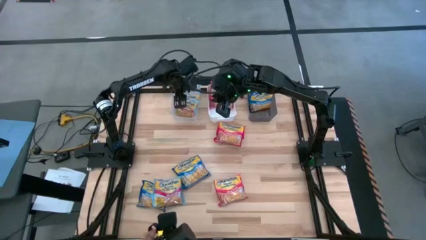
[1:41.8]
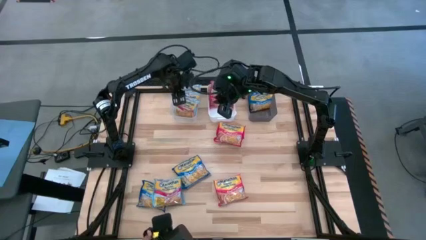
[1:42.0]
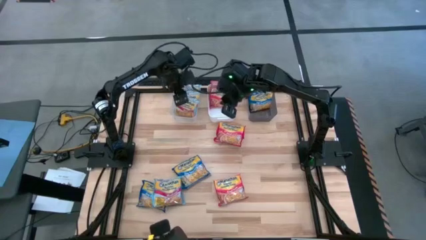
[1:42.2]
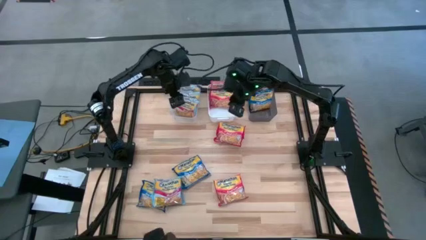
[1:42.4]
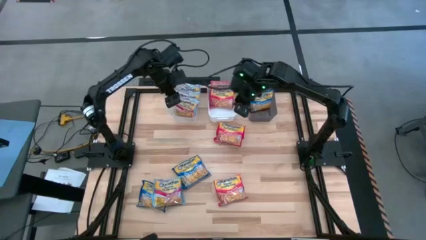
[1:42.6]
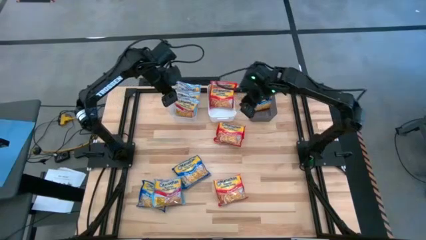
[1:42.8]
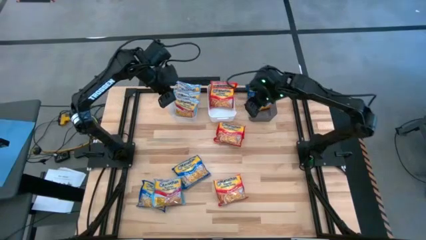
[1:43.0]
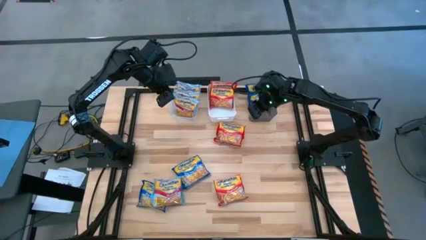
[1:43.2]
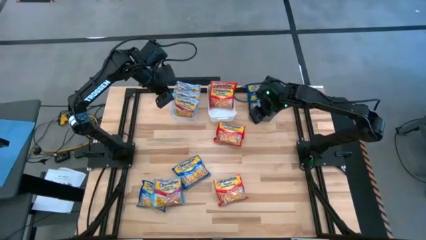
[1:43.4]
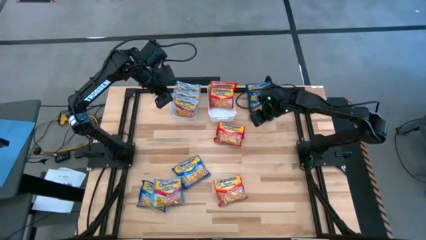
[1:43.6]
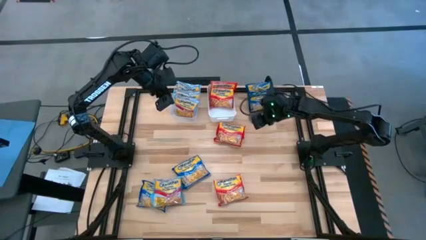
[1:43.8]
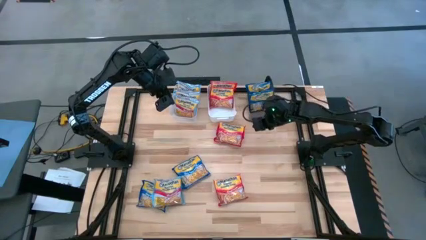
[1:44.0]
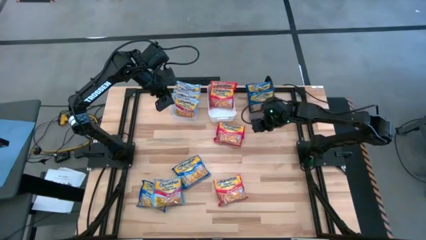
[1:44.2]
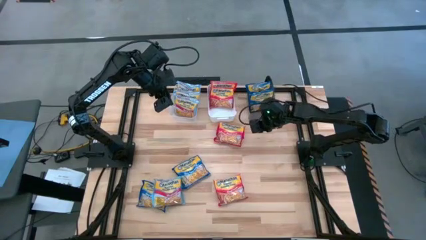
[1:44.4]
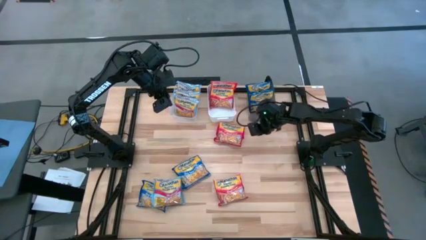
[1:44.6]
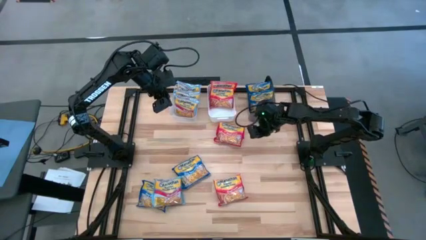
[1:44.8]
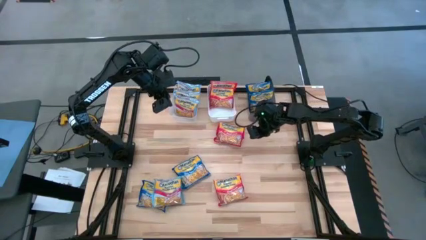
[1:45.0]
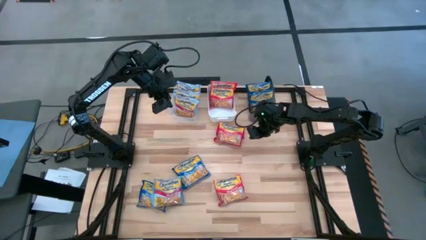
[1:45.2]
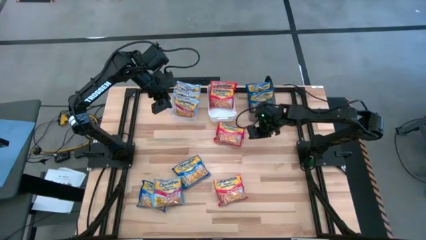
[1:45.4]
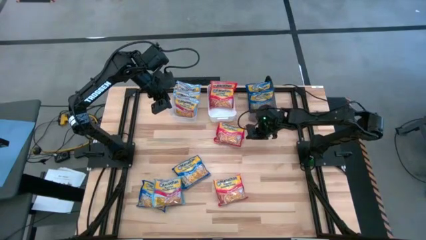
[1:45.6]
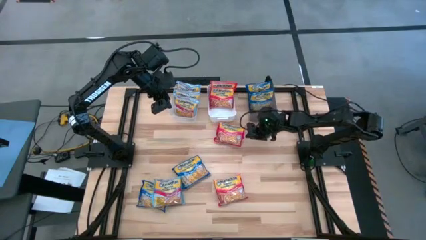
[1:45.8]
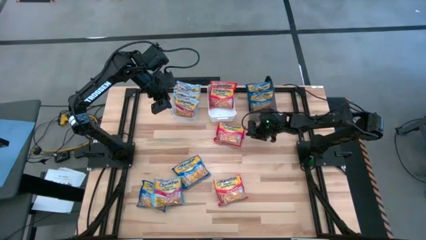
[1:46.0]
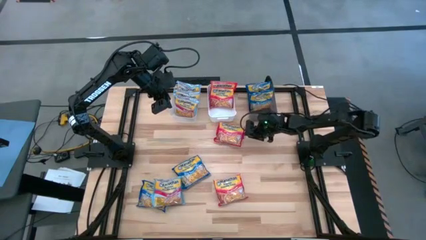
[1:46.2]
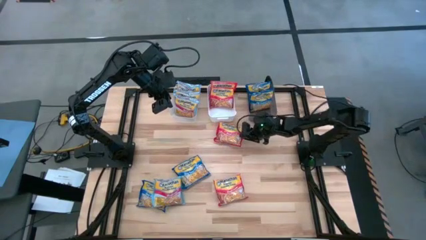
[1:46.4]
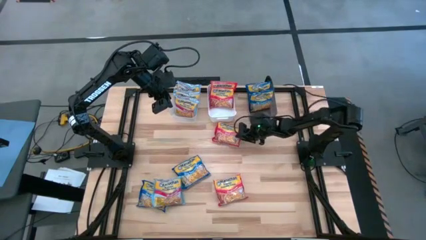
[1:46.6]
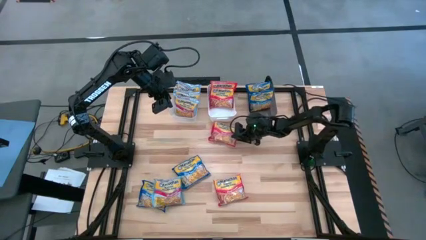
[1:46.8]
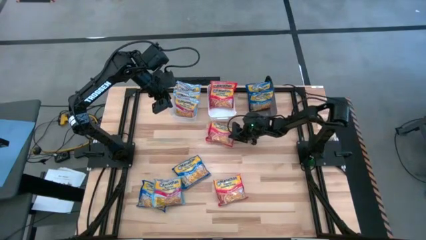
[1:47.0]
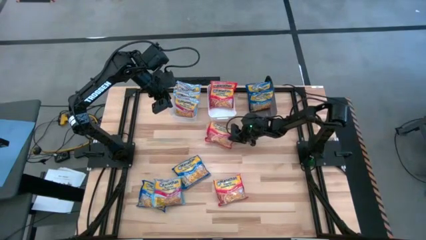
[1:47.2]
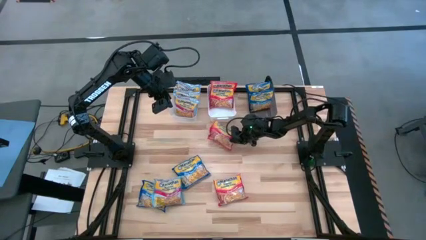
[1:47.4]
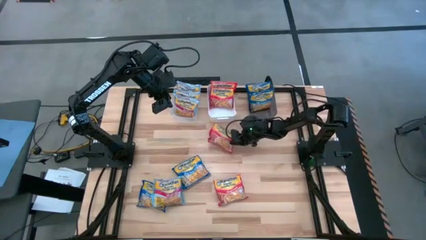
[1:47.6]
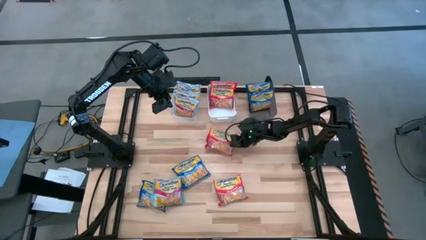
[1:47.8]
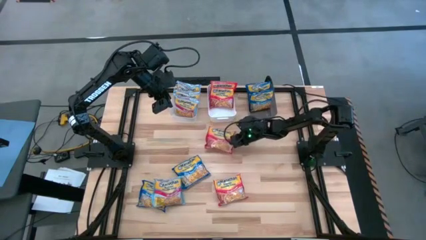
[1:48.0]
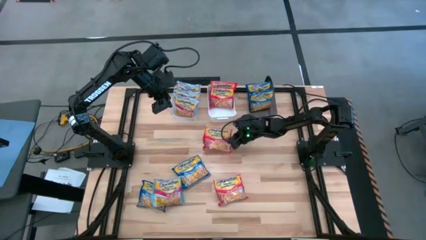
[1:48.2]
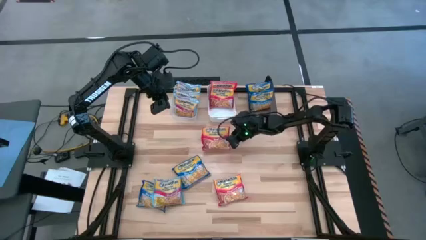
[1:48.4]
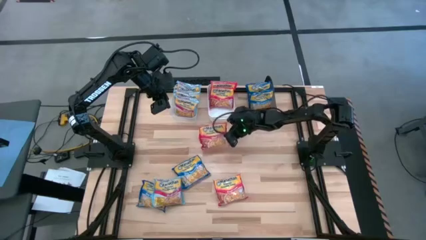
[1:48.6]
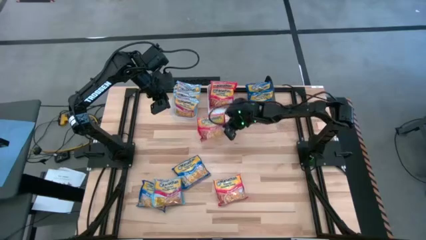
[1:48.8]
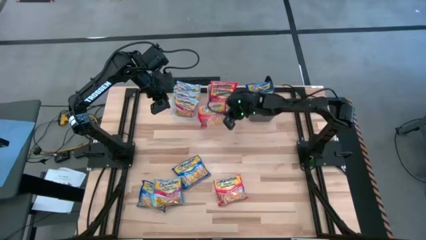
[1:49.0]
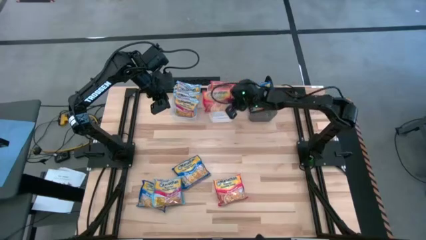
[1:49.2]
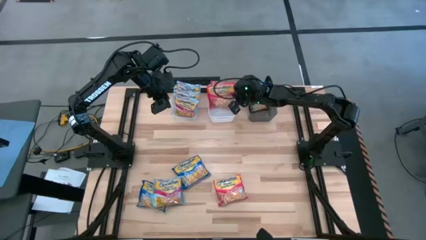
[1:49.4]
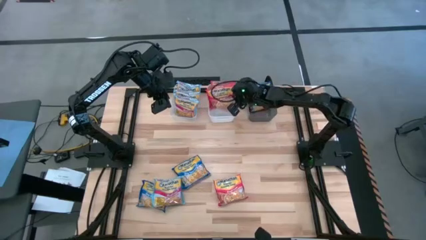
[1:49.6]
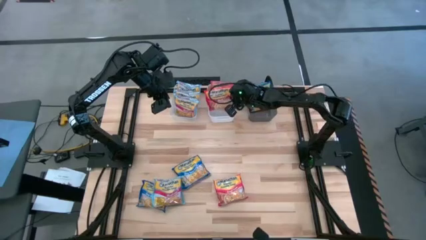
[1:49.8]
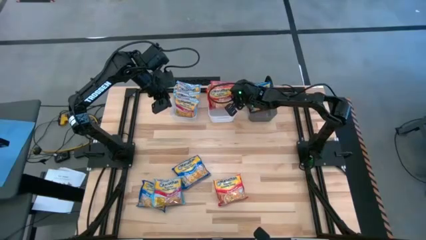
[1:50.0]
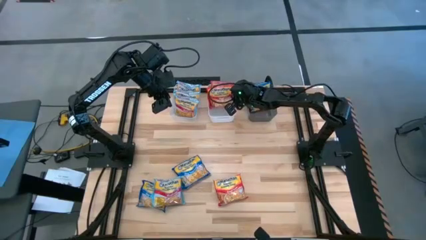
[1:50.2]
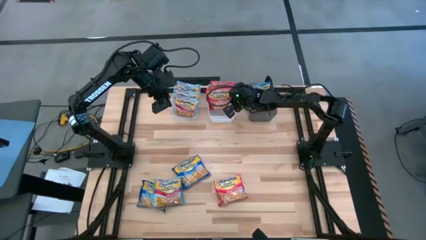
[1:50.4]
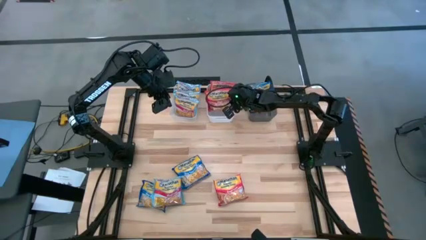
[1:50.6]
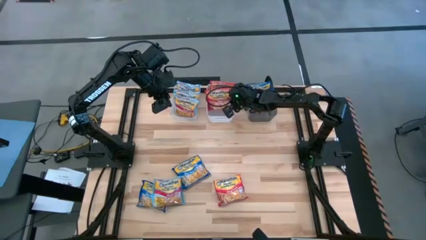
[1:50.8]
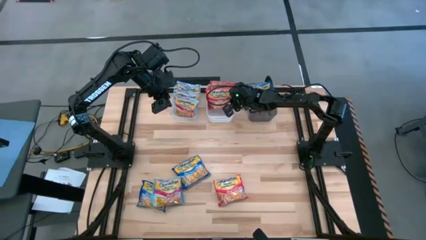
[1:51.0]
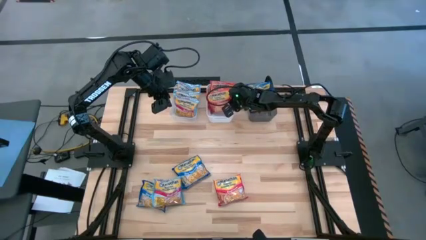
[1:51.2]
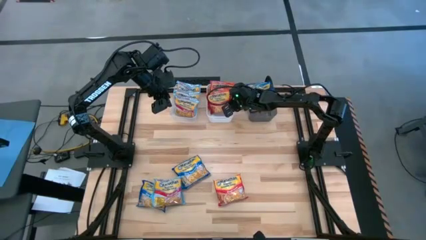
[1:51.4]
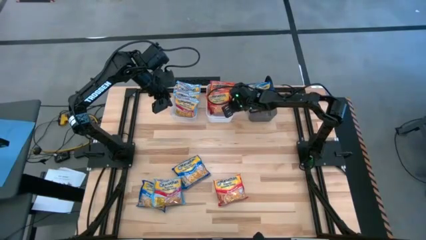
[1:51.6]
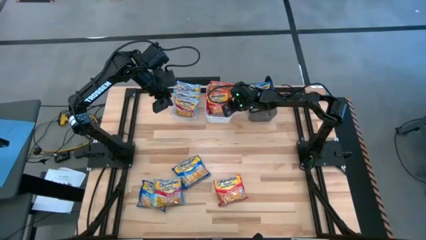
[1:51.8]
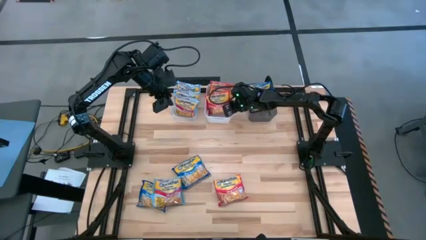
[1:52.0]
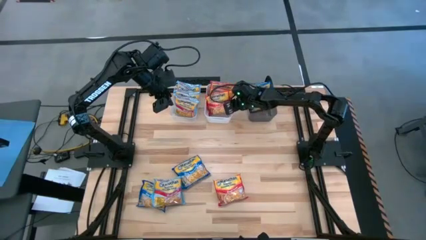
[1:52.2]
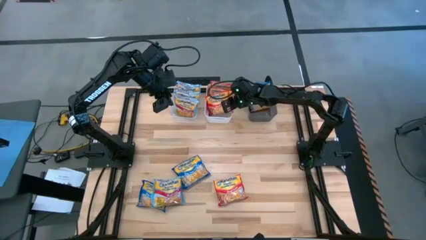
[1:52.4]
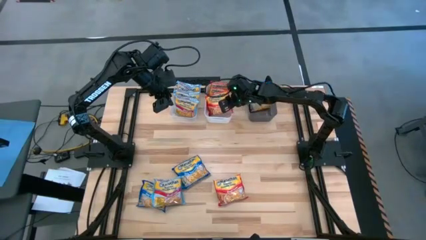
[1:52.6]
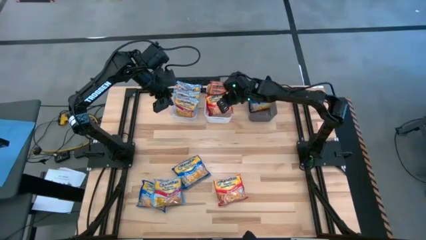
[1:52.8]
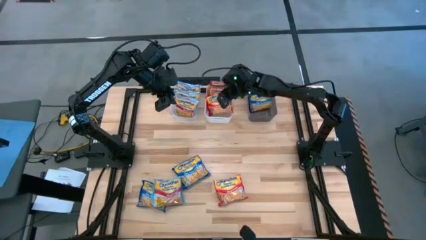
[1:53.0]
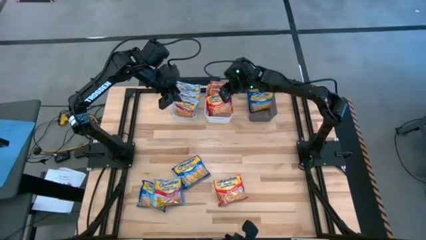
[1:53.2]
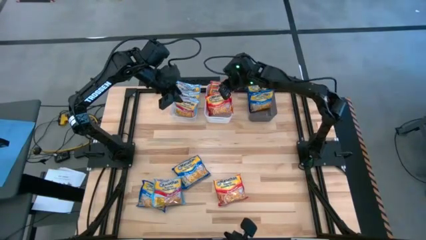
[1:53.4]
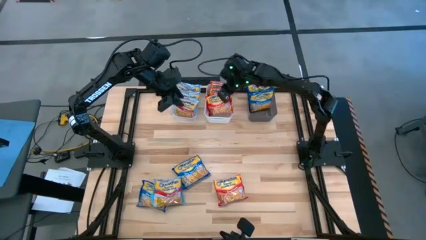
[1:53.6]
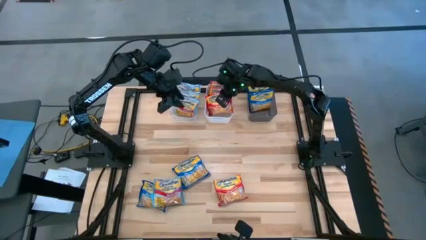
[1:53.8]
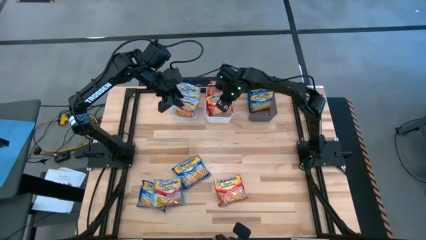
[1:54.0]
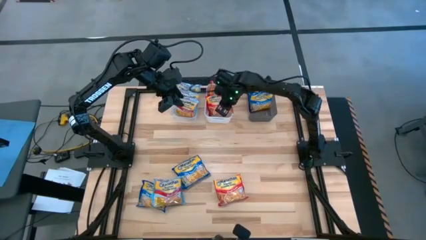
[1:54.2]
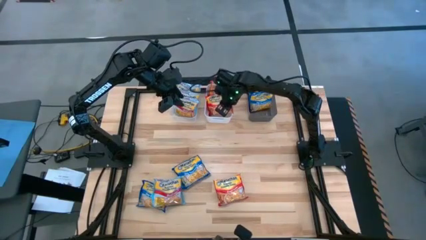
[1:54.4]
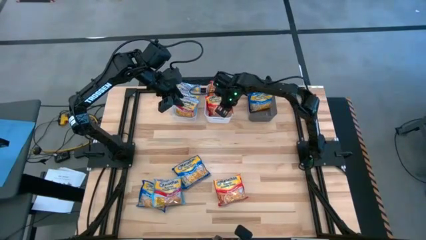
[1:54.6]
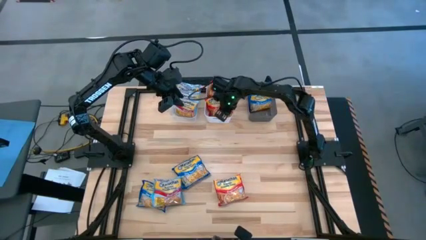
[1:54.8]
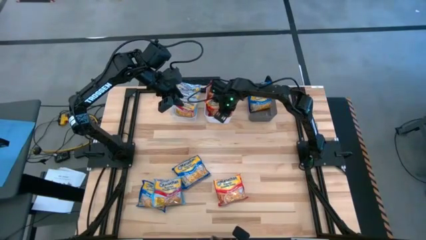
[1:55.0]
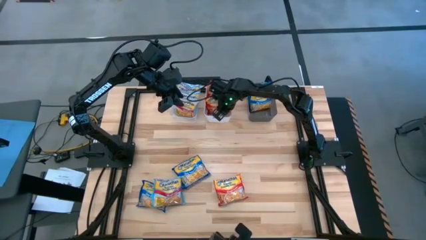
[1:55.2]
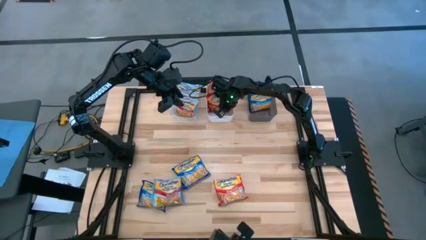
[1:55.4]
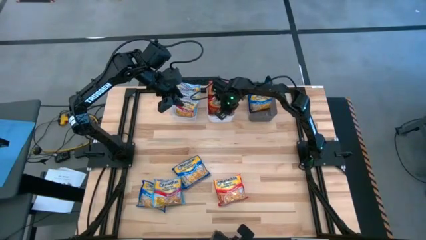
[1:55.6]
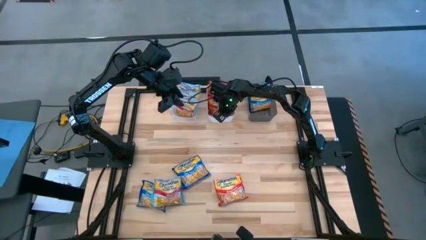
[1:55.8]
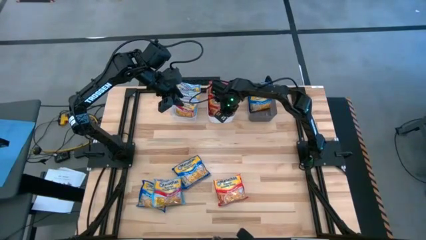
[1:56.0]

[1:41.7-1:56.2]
Task: Sort Maruchan noodles
Put the orange bag into the white bin
